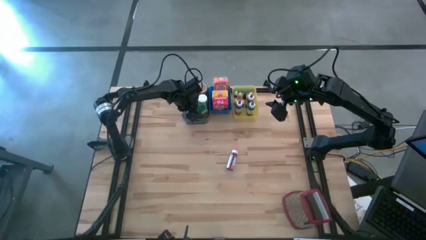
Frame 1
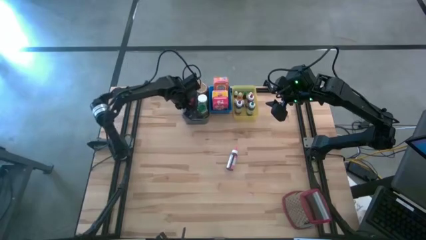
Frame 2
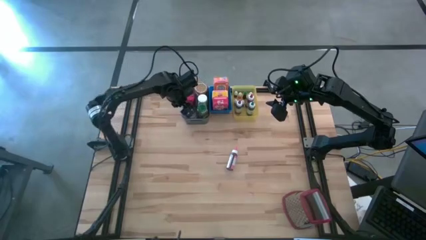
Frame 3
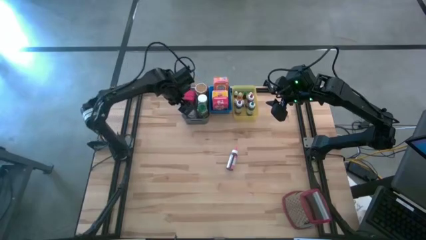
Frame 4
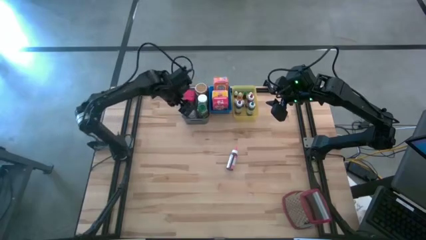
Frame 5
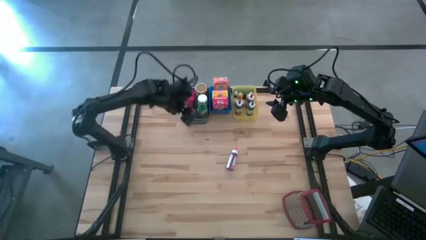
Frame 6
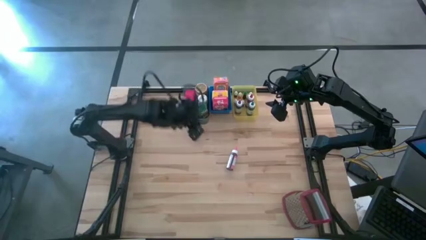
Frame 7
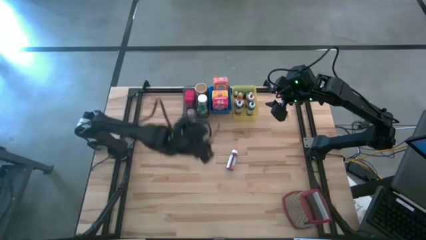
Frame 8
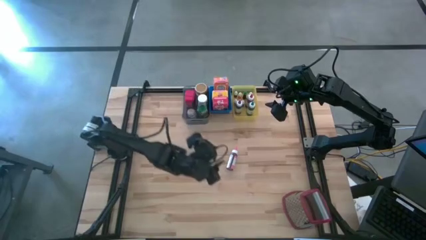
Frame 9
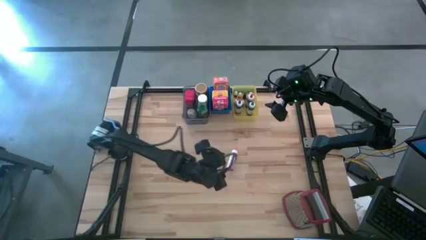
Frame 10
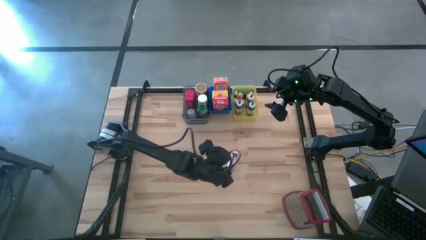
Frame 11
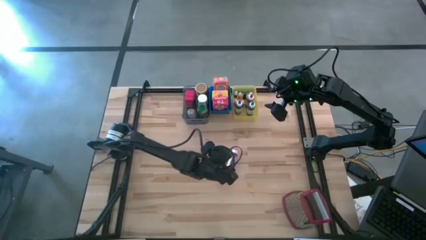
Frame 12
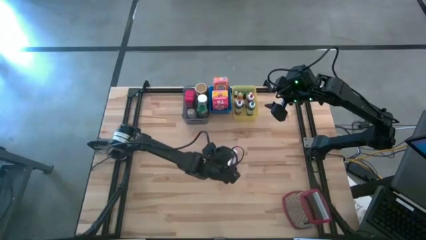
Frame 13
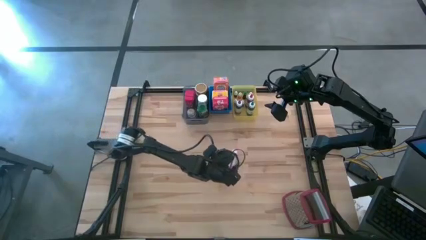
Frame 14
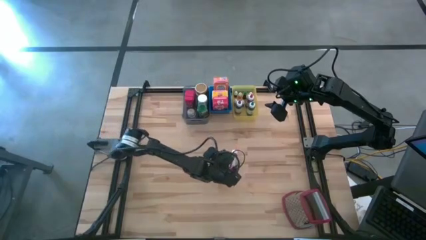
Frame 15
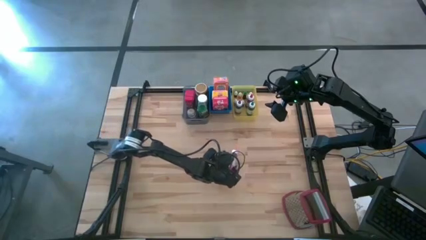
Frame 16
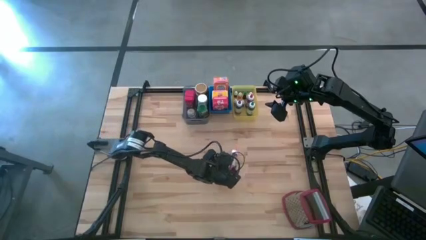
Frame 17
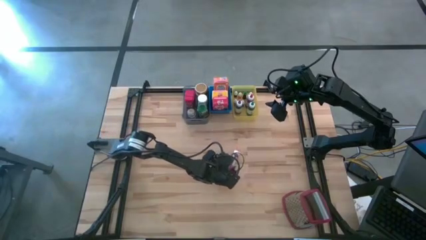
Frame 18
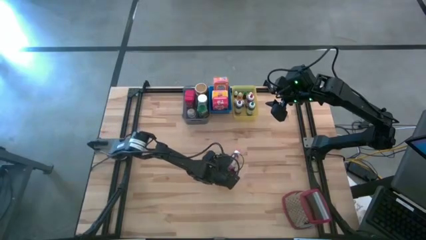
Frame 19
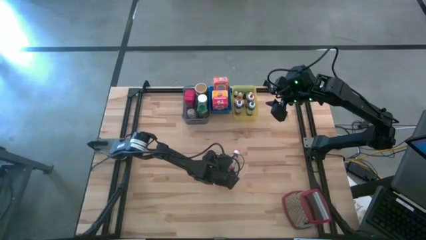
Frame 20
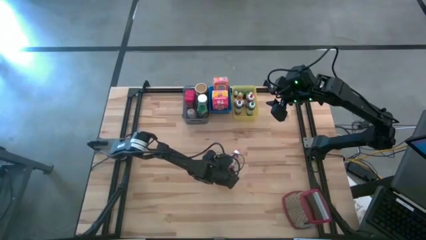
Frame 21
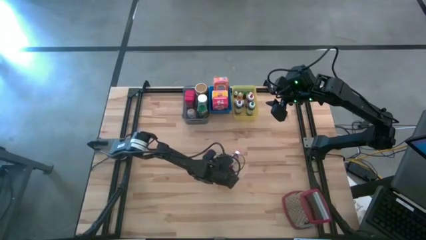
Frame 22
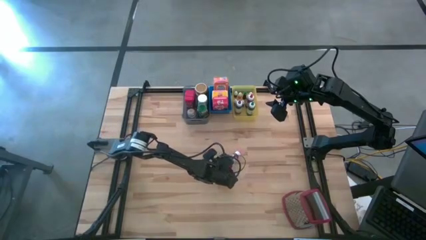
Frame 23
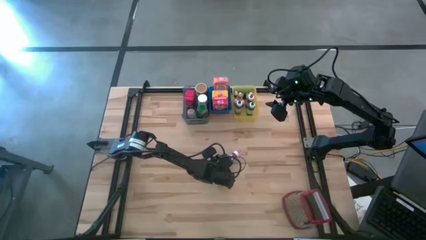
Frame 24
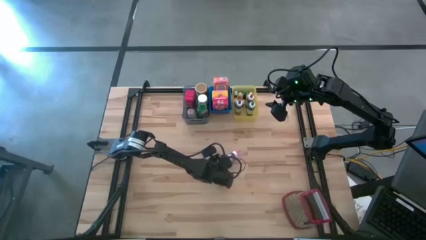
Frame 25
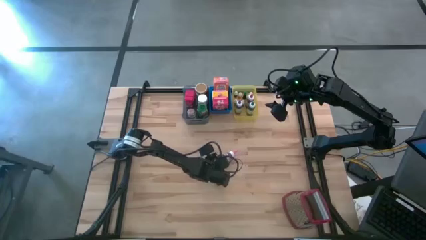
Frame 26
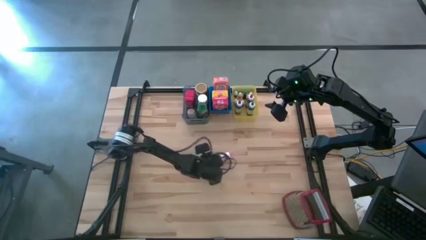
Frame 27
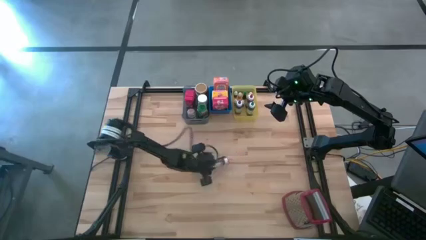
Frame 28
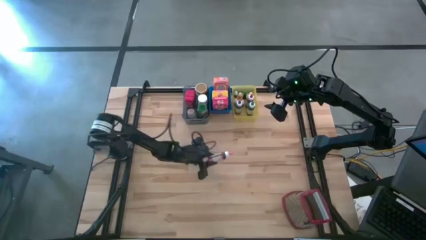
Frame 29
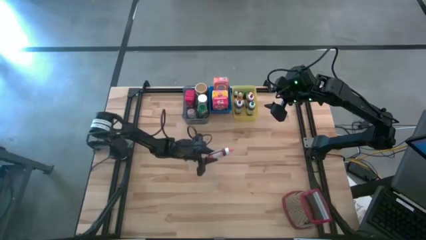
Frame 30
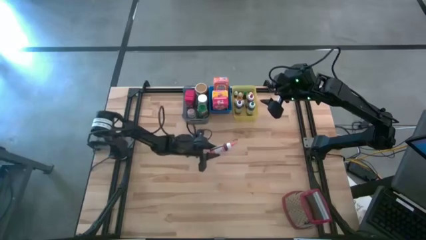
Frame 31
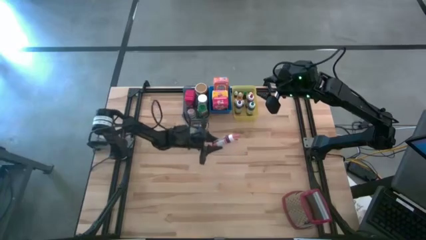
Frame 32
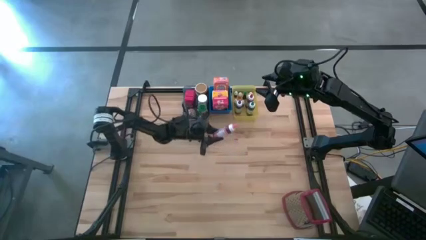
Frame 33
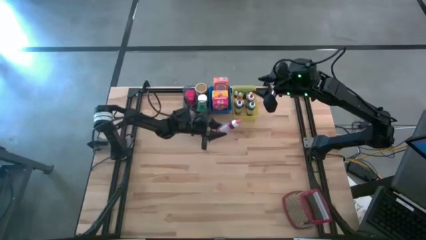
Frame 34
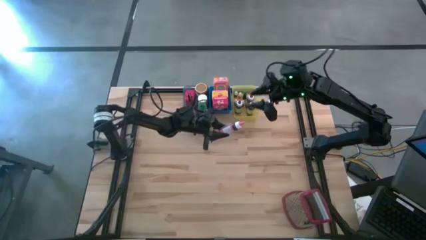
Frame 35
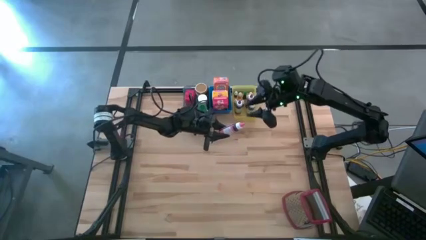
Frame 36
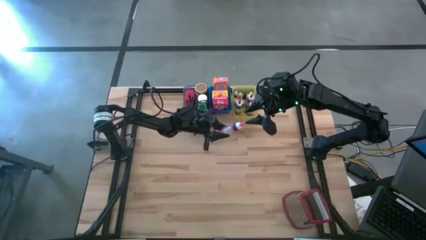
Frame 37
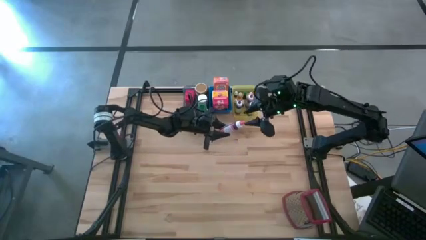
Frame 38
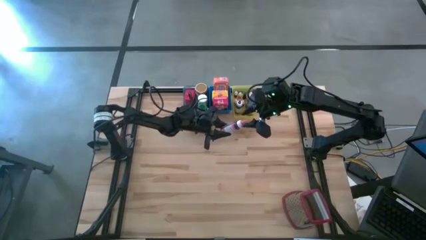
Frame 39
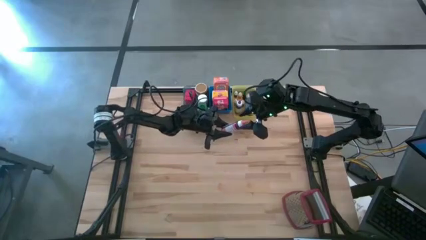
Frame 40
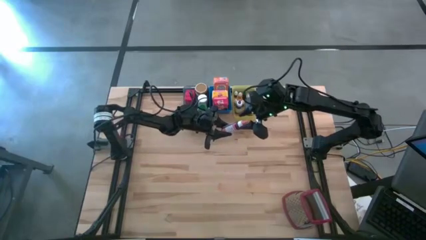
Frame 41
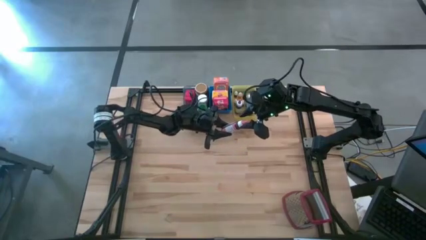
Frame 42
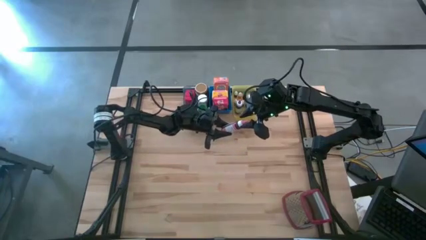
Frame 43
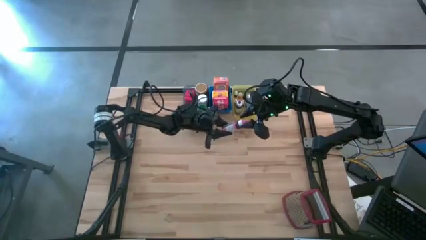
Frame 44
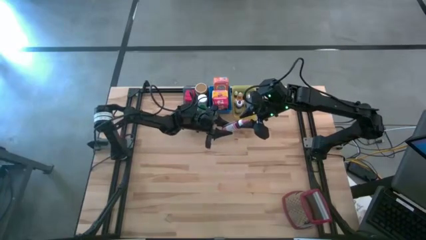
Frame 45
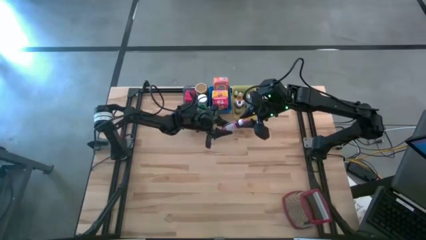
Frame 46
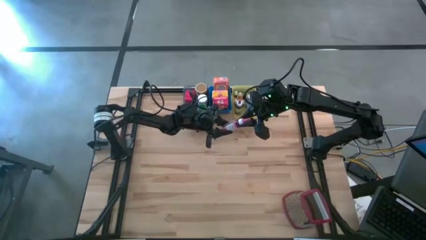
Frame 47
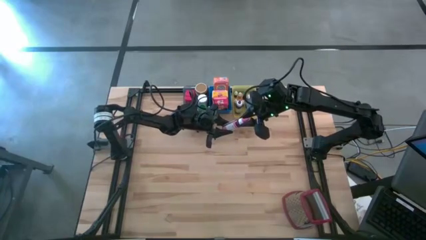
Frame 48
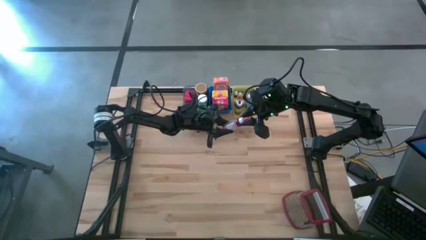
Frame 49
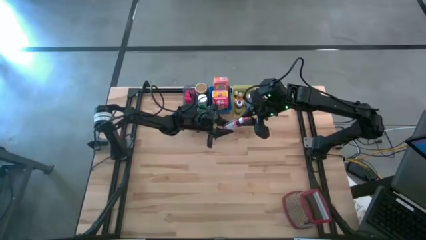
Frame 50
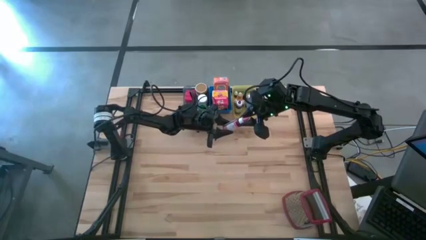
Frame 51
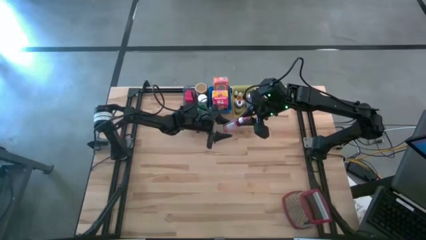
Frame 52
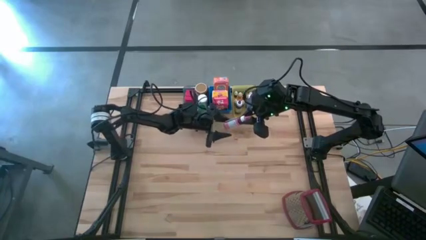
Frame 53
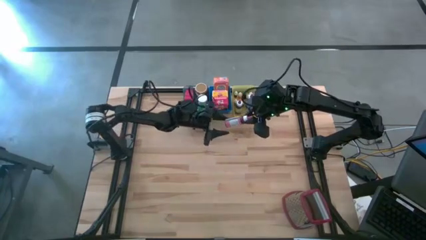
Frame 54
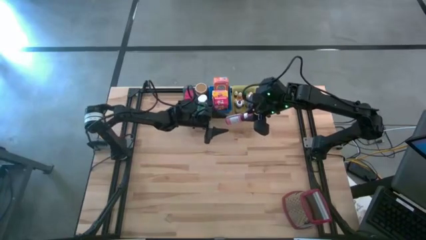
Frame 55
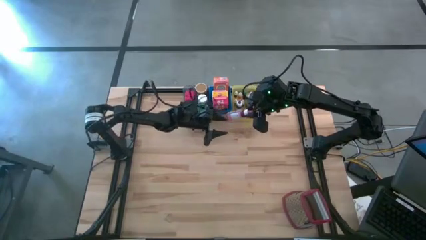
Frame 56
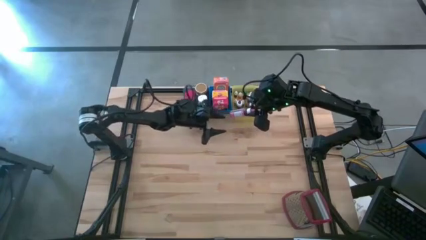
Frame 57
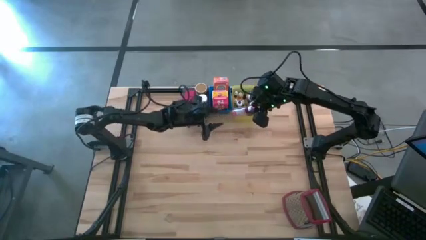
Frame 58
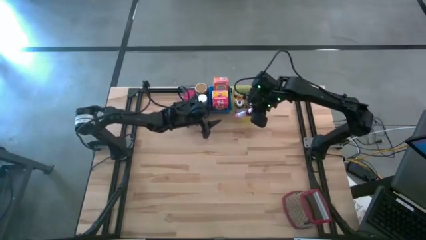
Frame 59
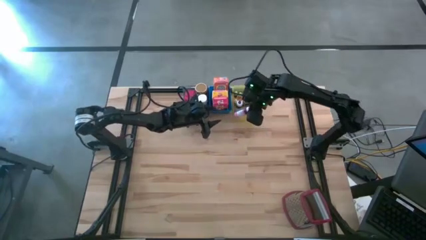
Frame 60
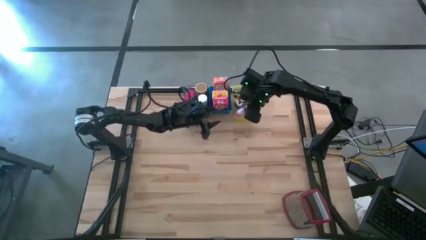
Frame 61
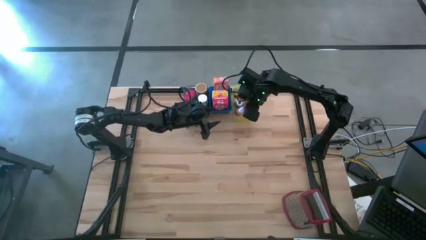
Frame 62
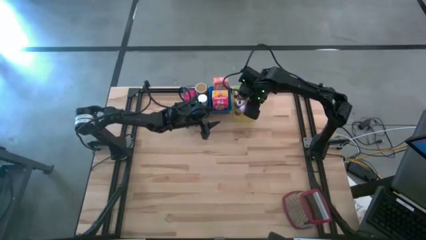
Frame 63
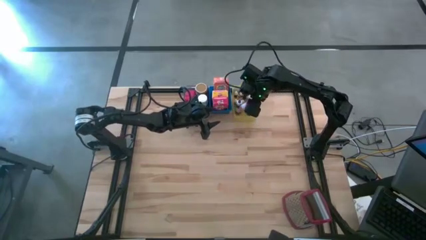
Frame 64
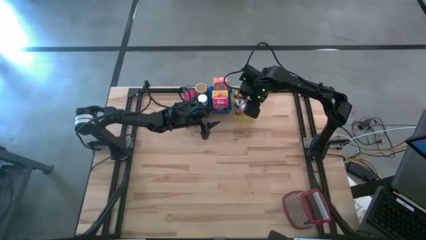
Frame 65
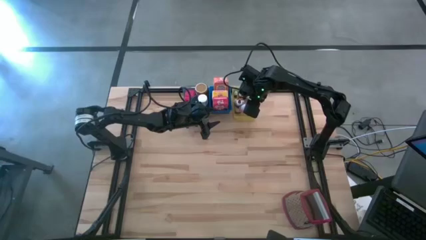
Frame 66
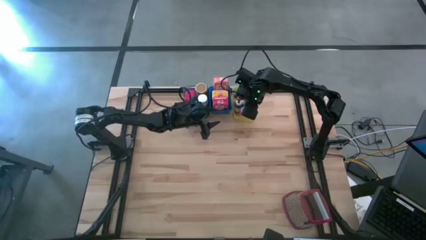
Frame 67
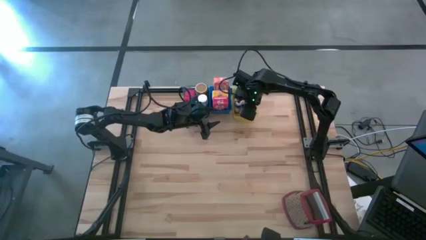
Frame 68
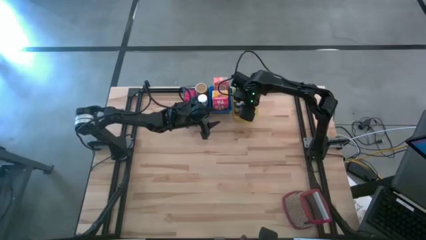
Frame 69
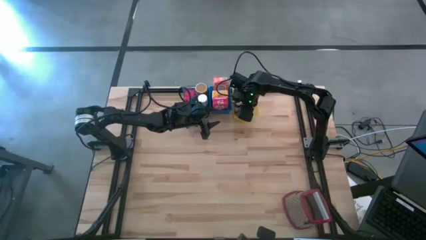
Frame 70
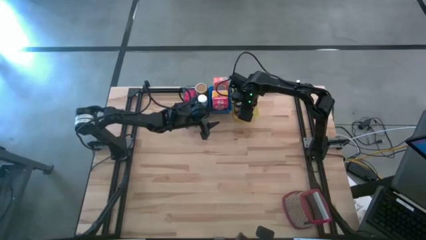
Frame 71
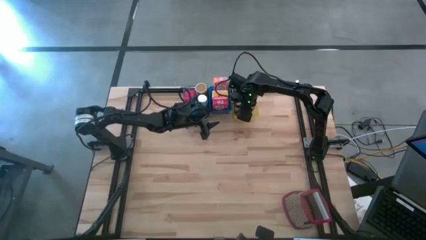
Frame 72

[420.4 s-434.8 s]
Task: Pick & Place Kitchen Items
Put the large pink food coloring bottle into the yellow bin

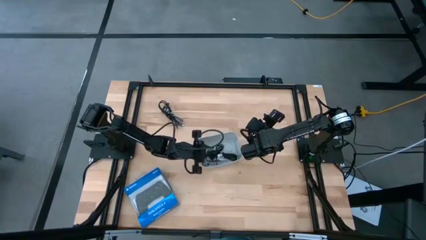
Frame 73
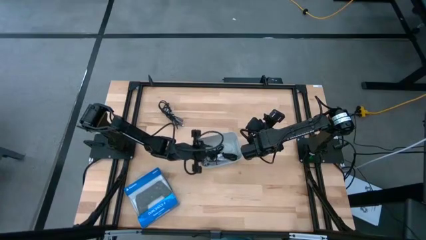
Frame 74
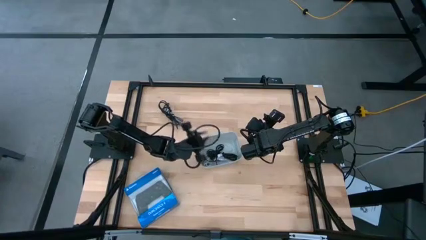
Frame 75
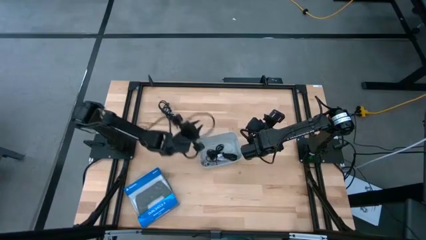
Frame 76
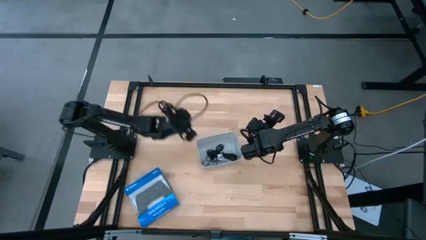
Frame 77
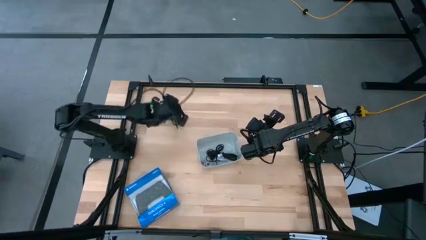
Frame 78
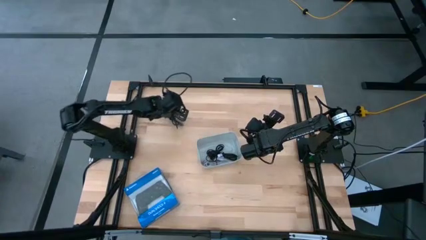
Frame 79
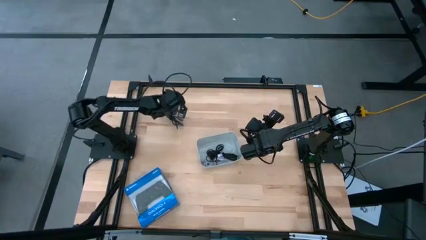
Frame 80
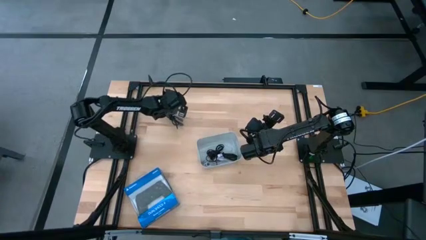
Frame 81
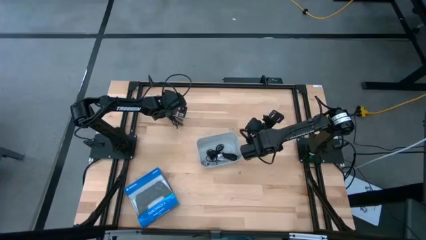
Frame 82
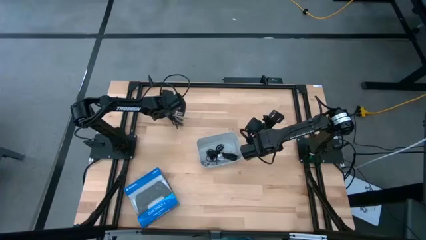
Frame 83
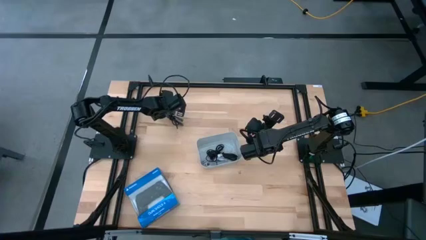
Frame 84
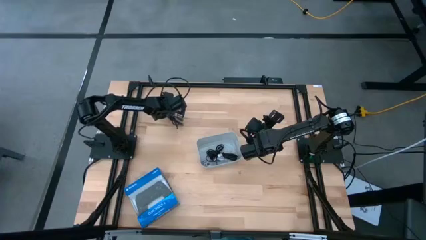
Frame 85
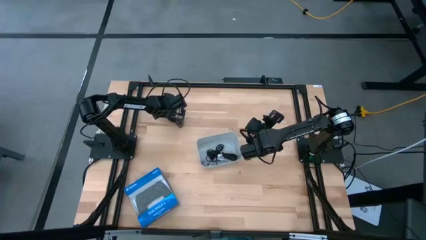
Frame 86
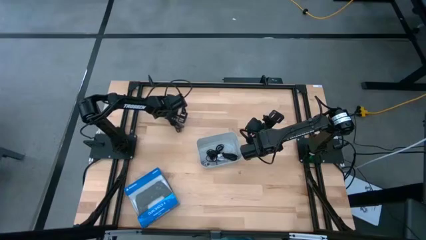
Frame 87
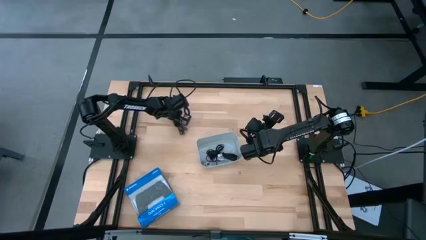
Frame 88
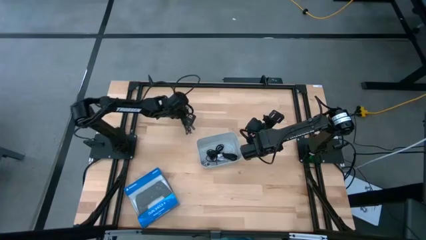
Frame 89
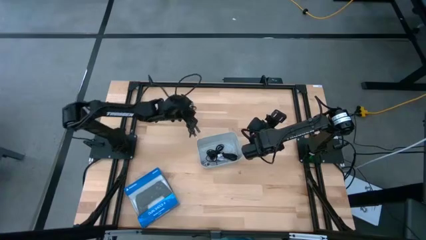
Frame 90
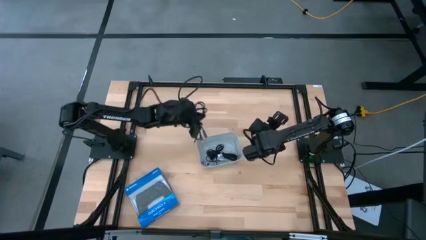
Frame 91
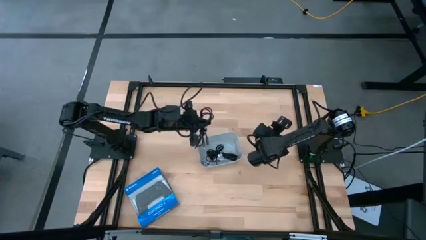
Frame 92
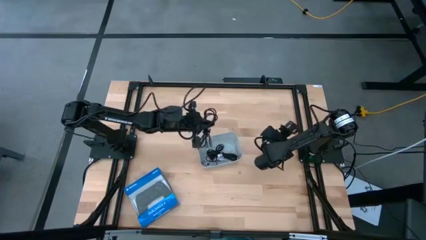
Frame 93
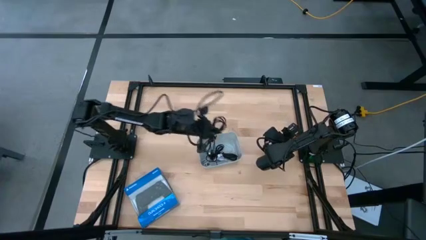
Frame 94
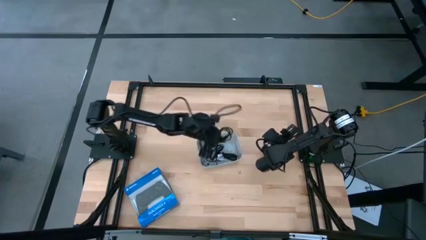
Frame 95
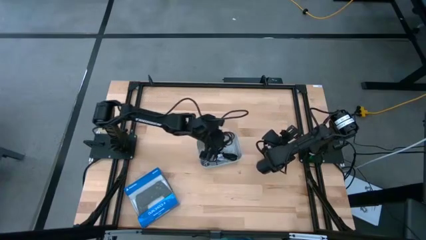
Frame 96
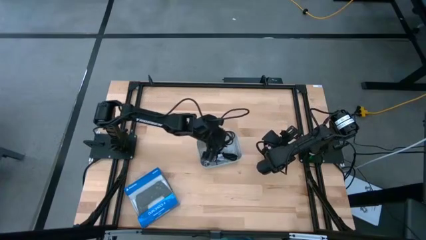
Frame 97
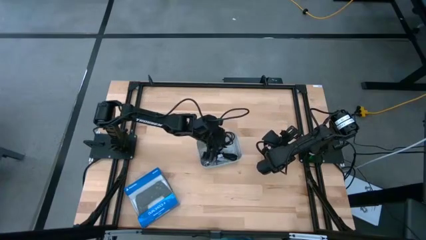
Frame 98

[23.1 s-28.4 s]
Task: Pick and place USB-C Cables
Put the black charger cable into the gray bin
